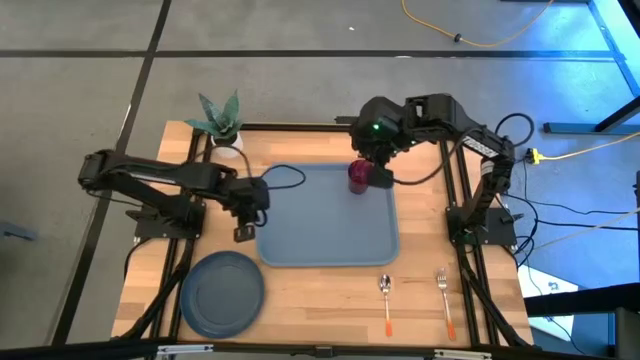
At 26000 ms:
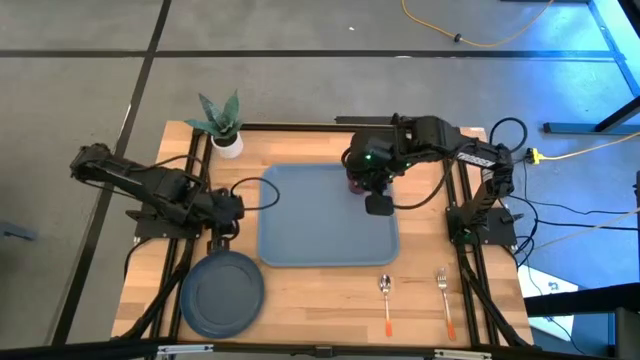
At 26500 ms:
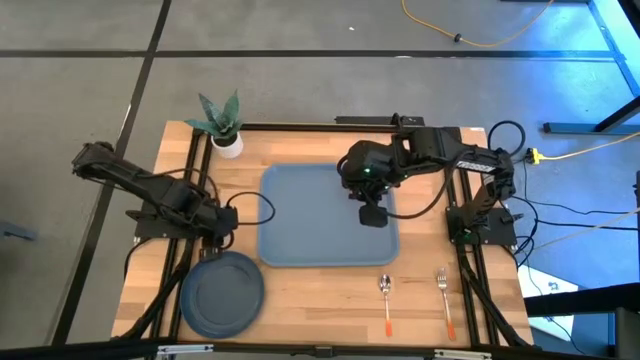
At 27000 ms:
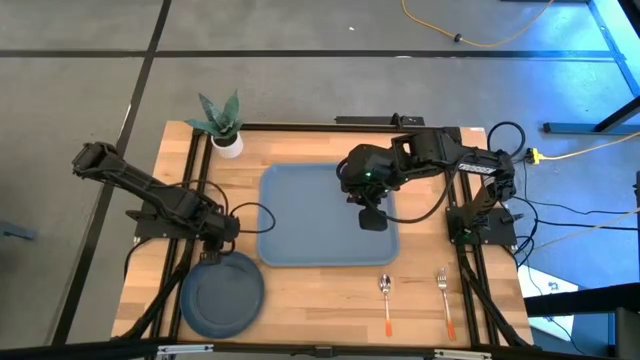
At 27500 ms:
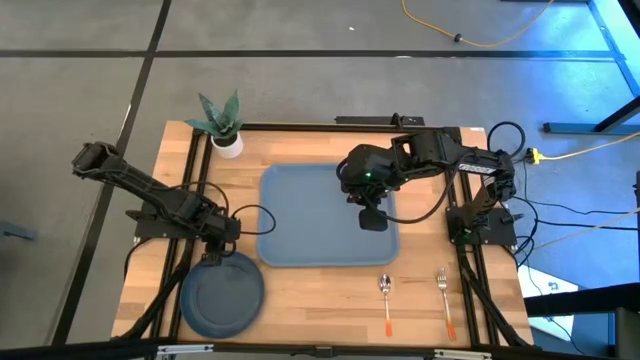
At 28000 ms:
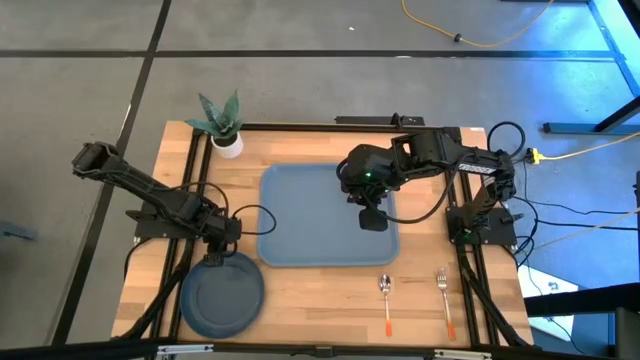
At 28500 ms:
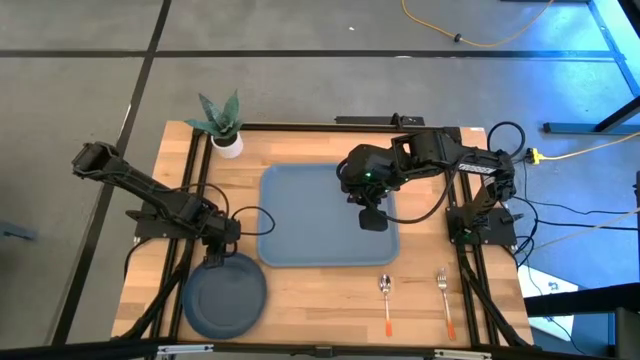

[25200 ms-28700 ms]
Task: Pick and place plate/cup/fork/spoon on tray
Put the dark blue plate on the blue tray

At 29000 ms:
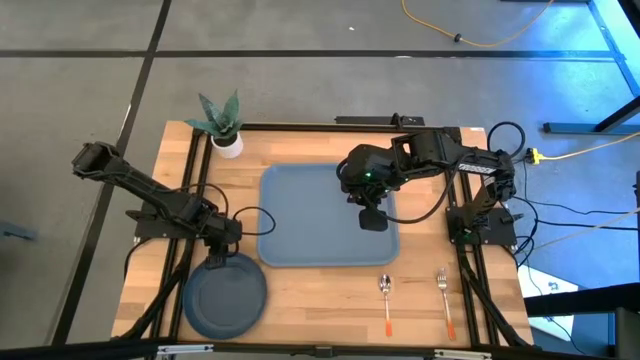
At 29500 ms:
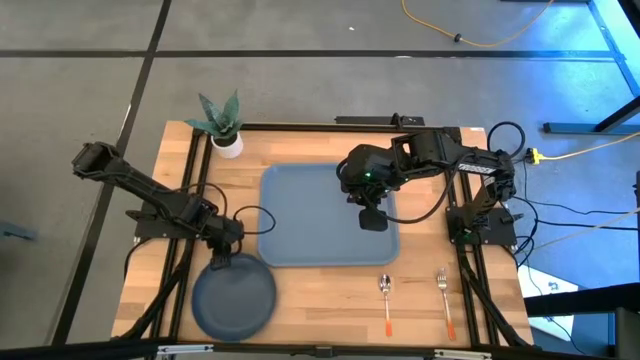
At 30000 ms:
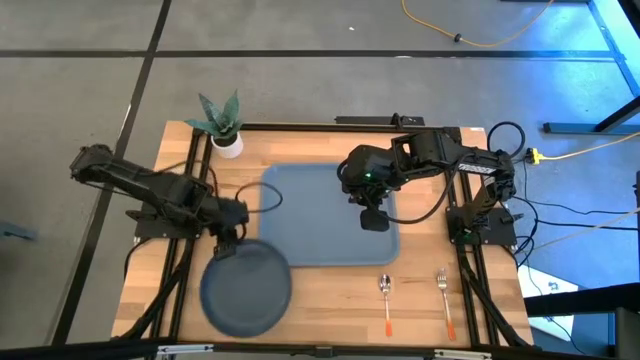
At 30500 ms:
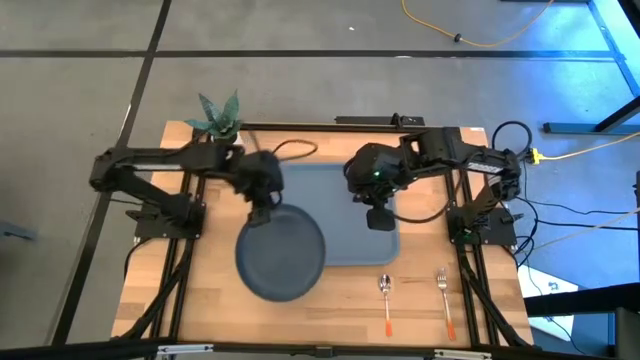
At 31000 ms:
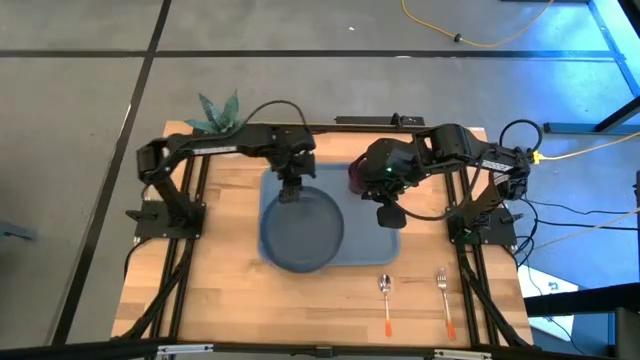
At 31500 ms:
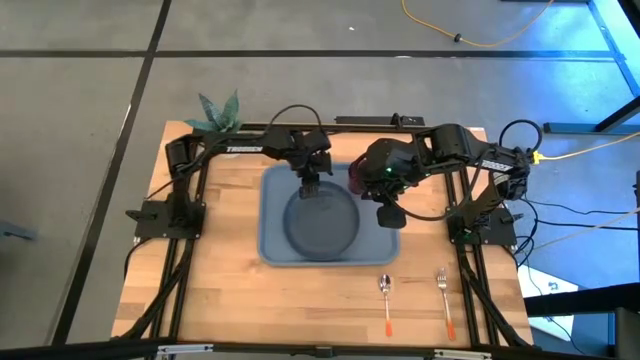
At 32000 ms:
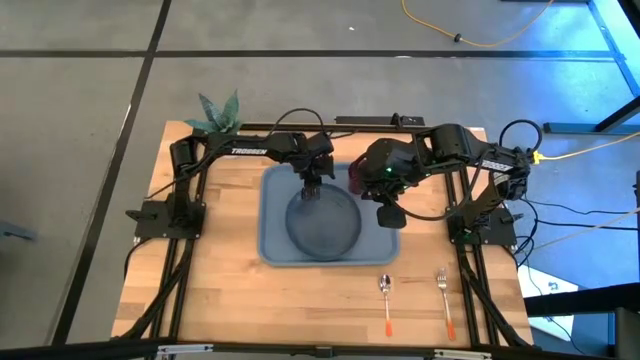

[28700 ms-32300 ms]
Put the dark blue plate on the blue tray

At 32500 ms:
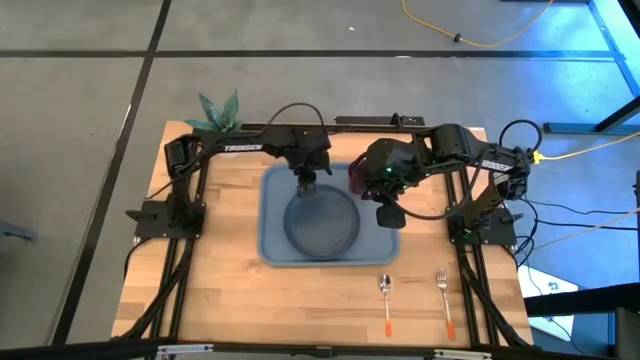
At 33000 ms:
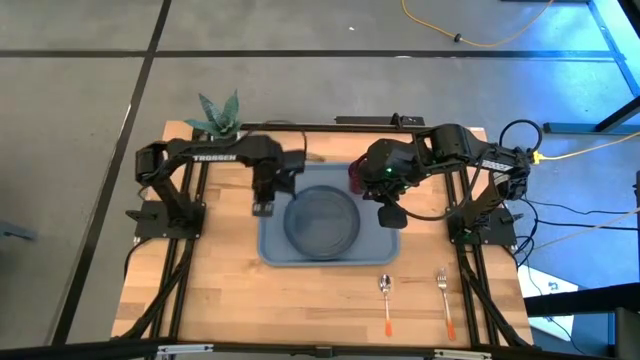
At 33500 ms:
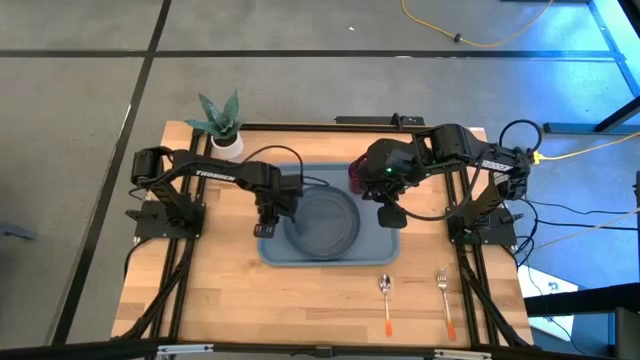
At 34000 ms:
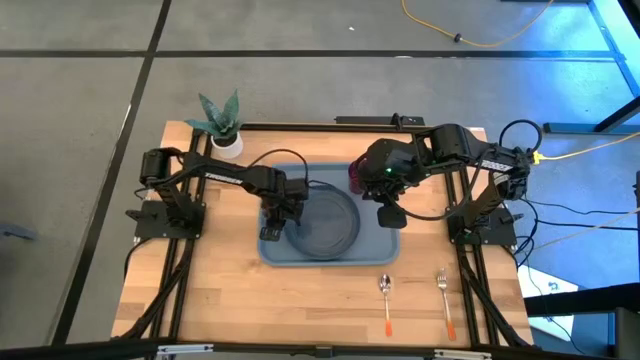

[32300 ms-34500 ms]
Adjust the dark blue plate on the blue tray

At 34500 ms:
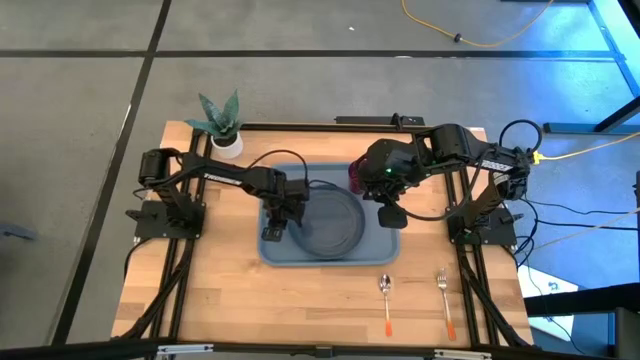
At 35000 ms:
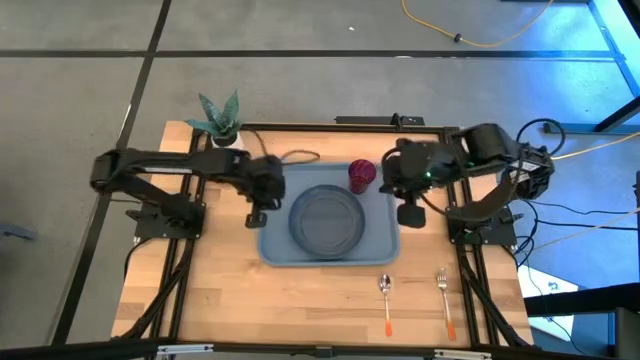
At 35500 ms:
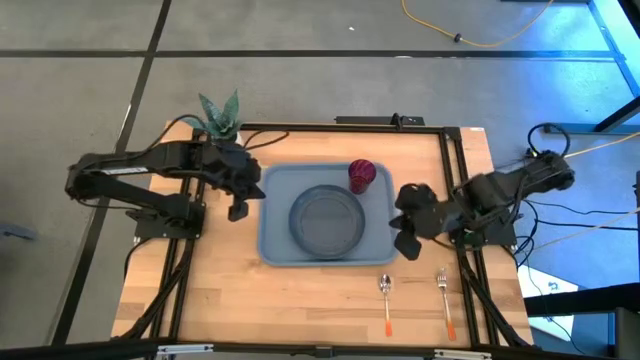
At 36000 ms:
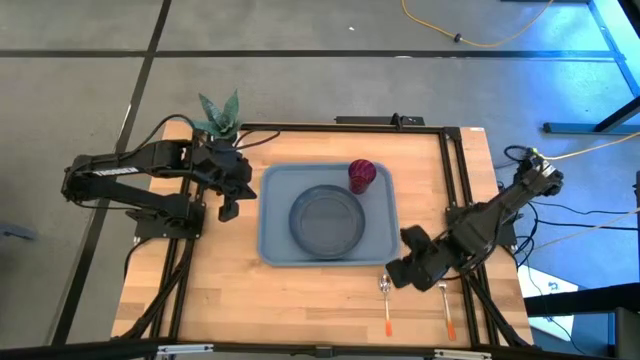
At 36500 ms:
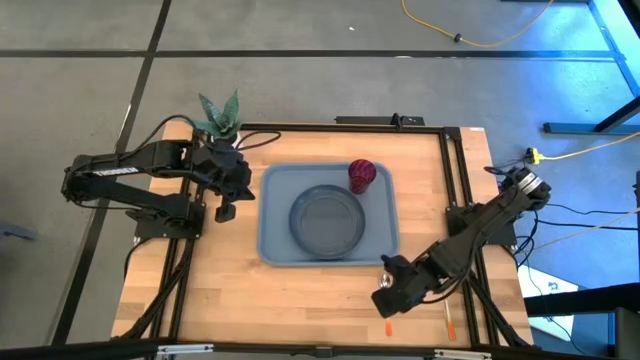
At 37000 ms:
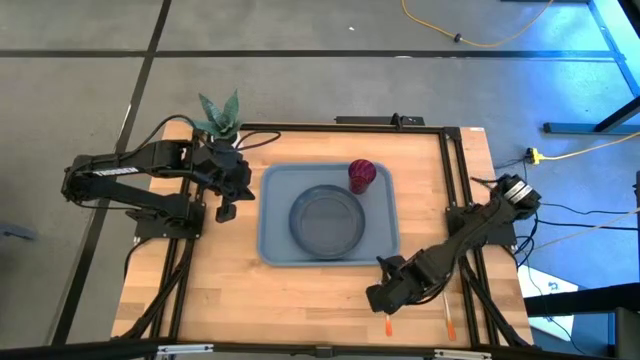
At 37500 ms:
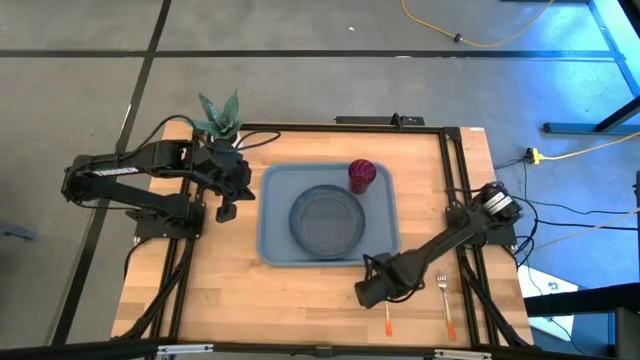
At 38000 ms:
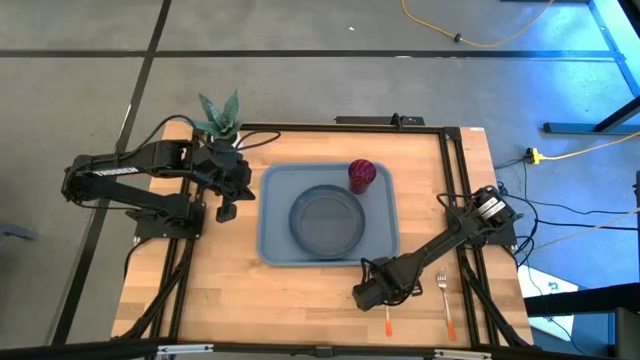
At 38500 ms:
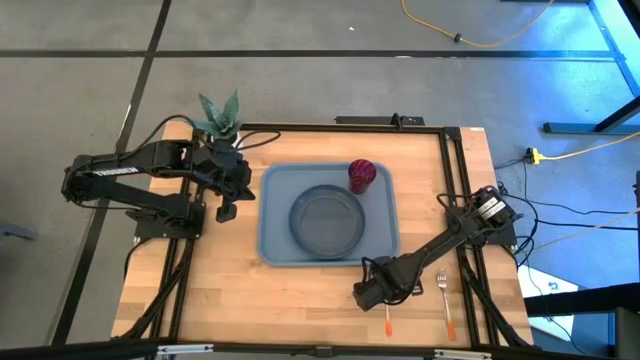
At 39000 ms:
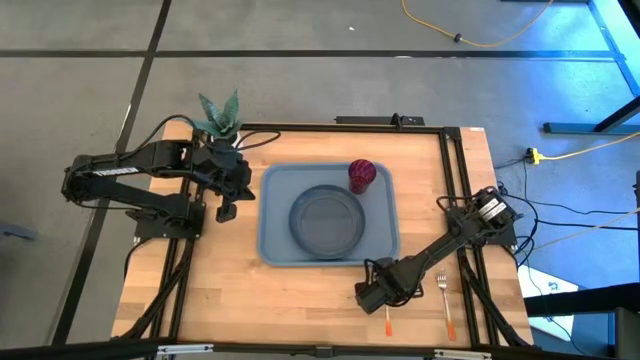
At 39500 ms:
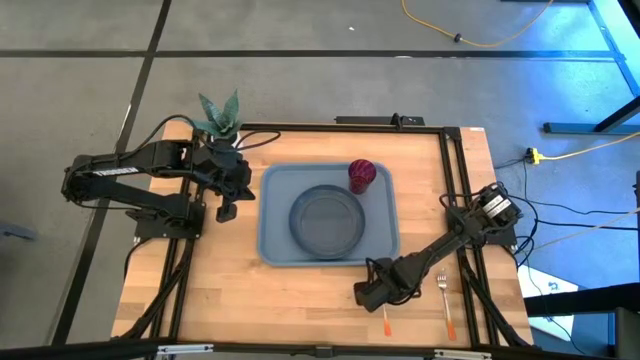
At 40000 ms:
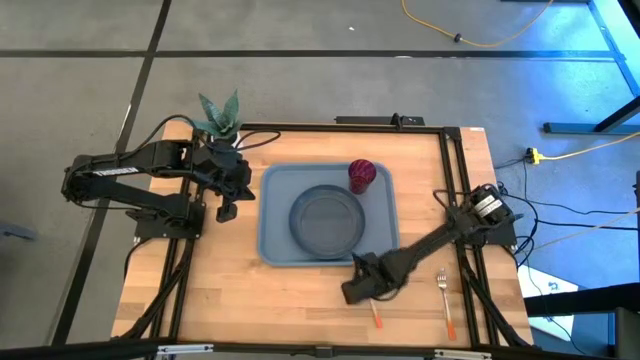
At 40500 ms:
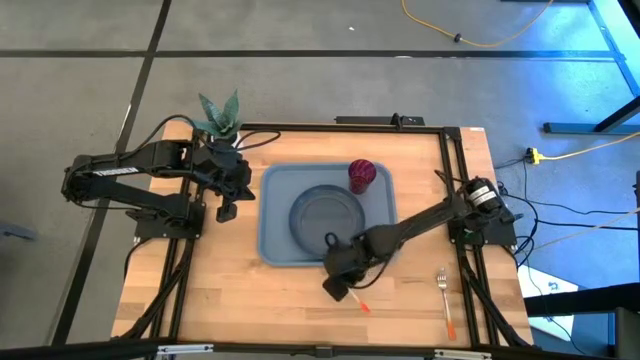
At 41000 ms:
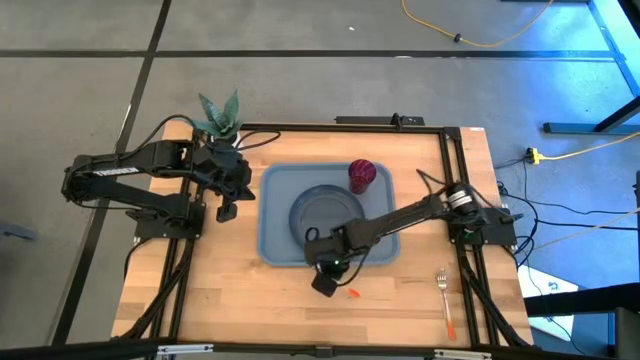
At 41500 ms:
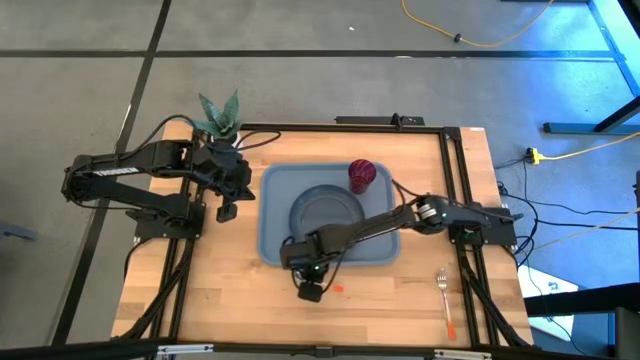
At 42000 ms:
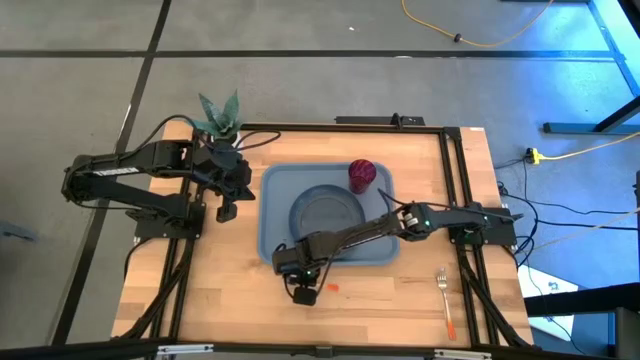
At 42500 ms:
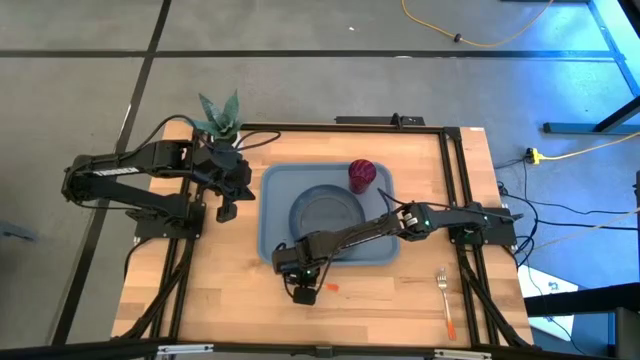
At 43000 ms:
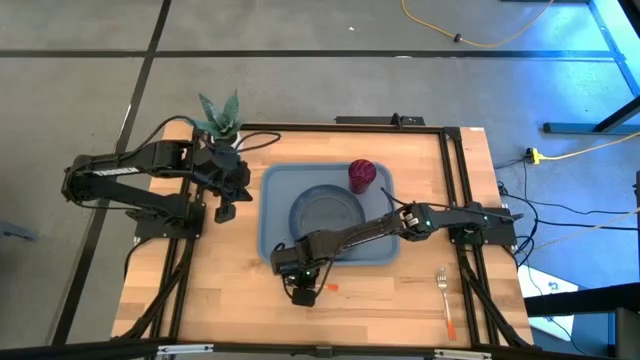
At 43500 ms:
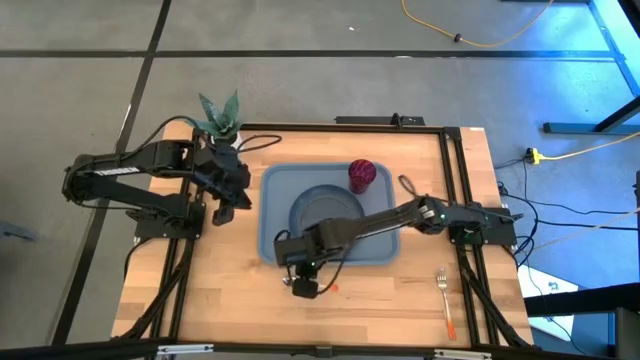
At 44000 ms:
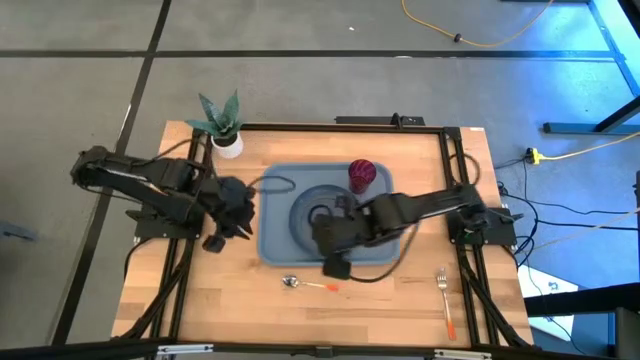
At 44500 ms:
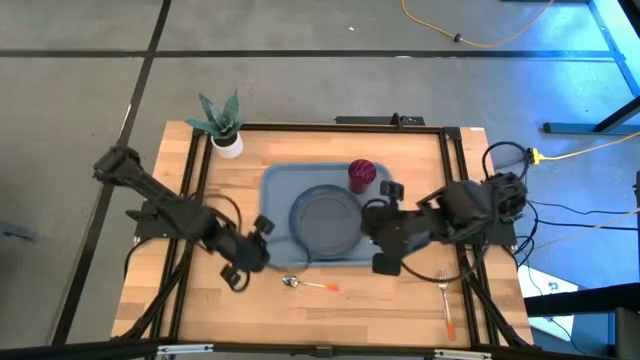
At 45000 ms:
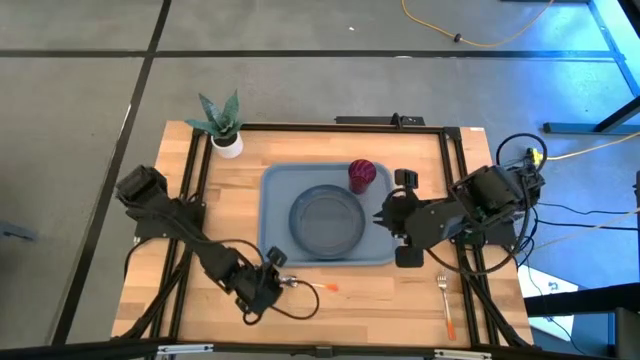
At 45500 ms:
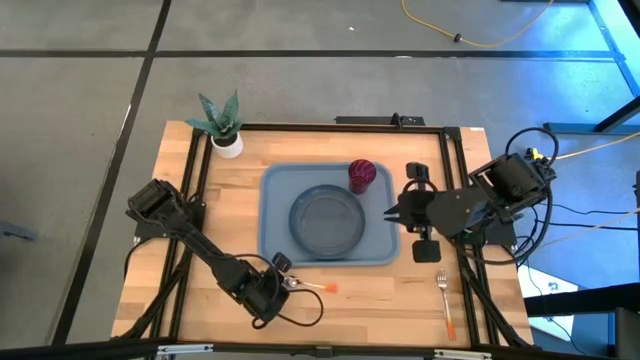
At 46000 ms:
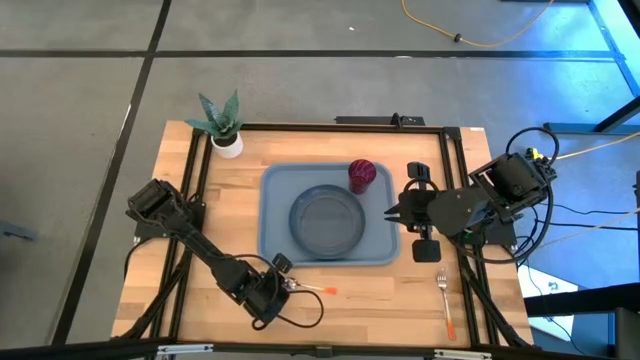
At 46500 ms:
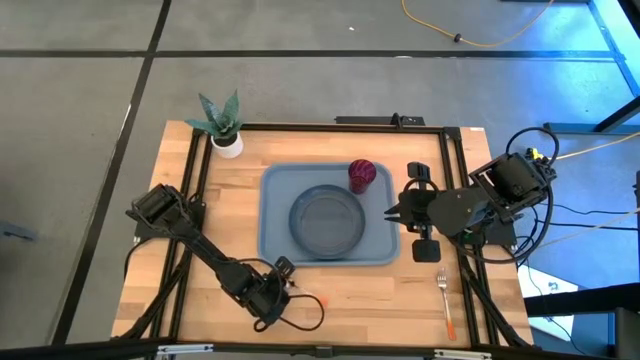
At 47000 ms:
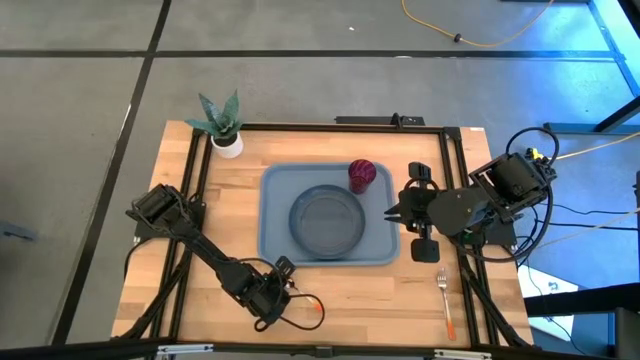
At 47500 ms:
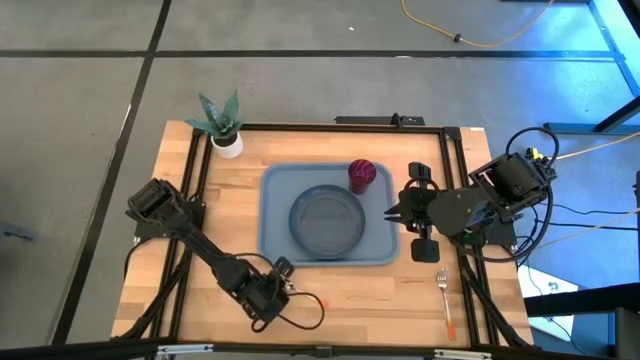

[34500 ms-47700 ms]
Put the orange spoon on the top left of the blue tray
